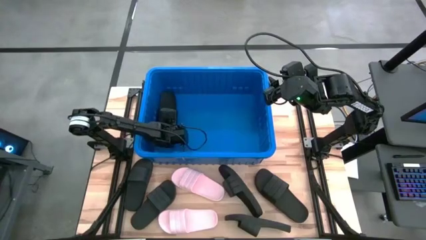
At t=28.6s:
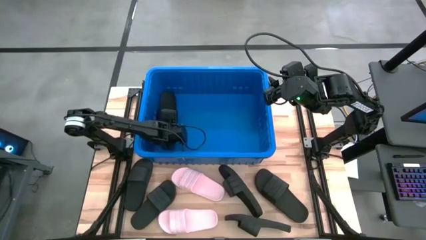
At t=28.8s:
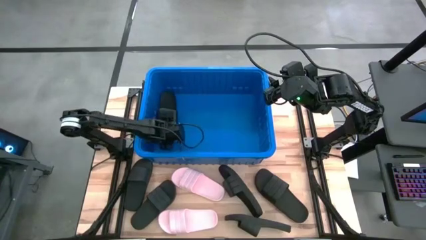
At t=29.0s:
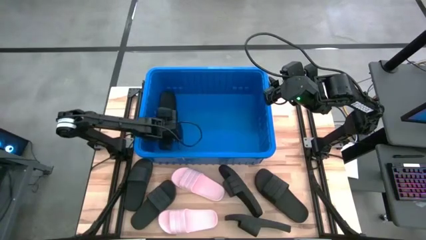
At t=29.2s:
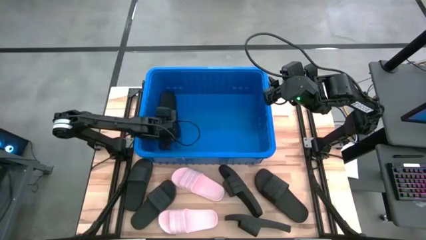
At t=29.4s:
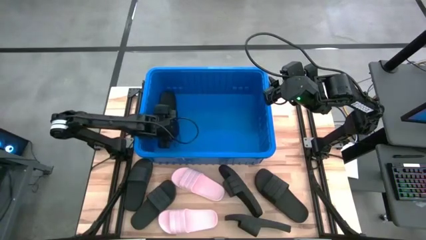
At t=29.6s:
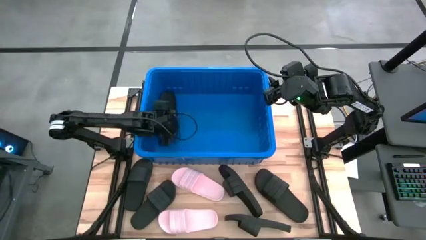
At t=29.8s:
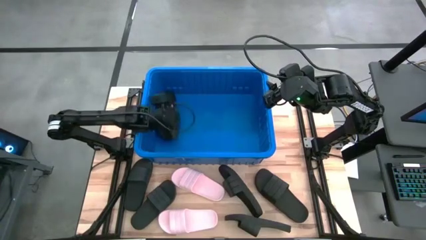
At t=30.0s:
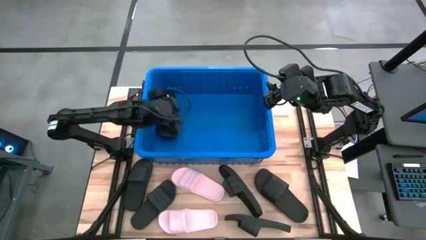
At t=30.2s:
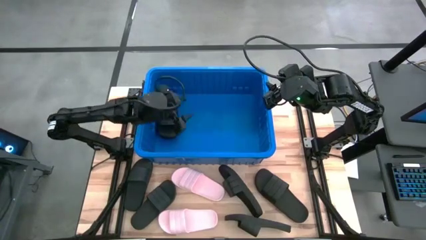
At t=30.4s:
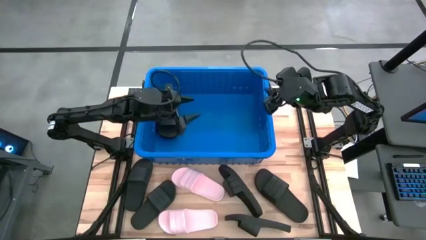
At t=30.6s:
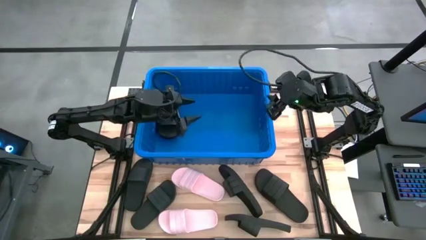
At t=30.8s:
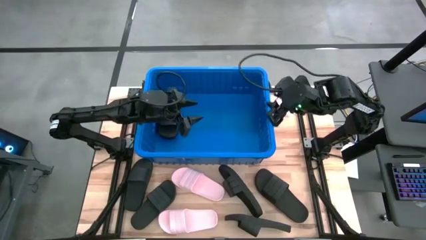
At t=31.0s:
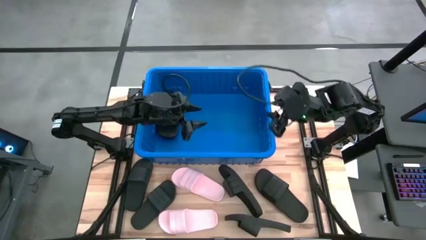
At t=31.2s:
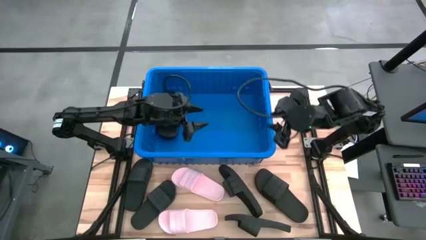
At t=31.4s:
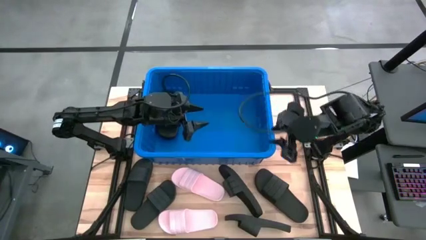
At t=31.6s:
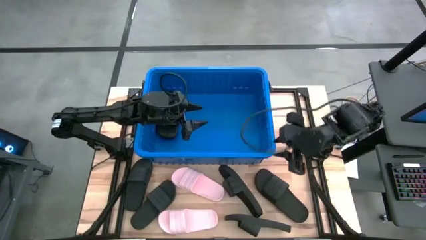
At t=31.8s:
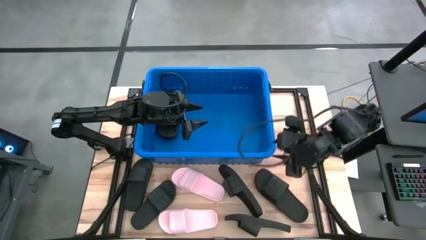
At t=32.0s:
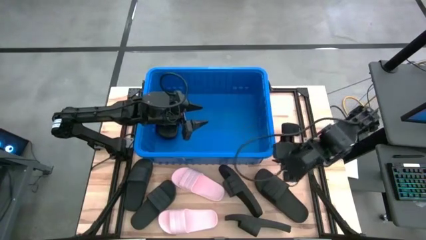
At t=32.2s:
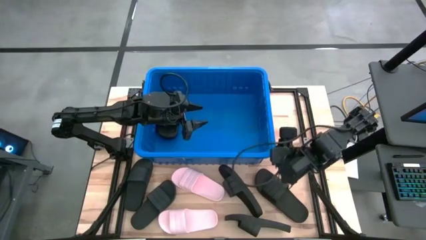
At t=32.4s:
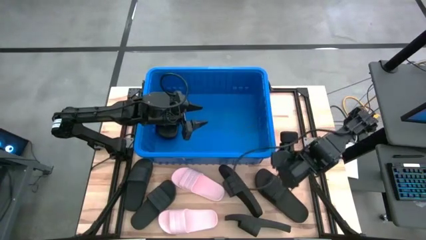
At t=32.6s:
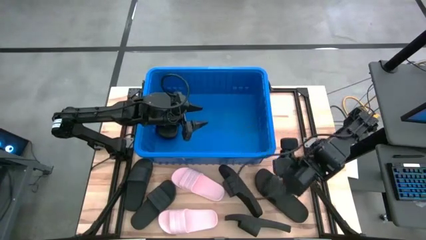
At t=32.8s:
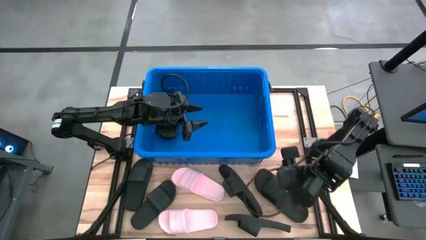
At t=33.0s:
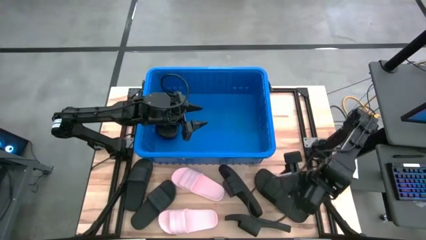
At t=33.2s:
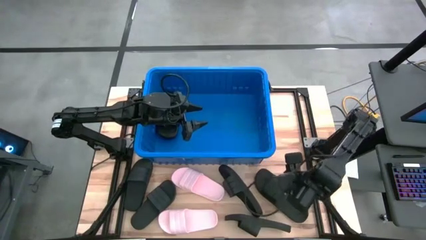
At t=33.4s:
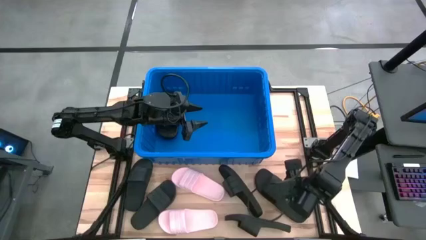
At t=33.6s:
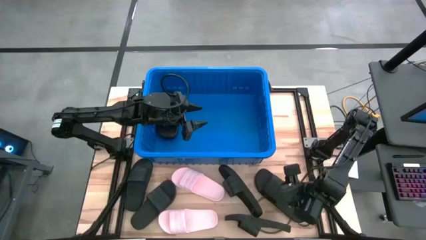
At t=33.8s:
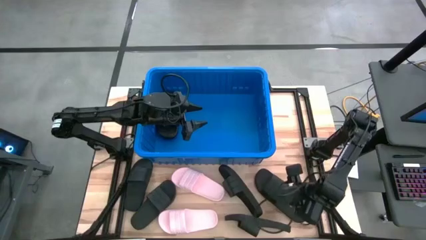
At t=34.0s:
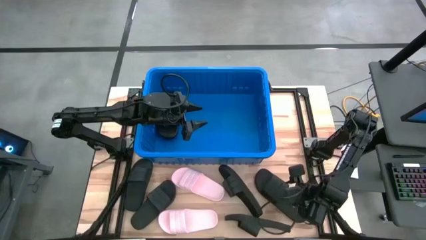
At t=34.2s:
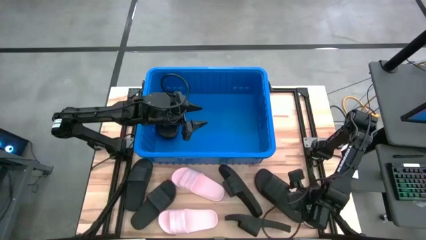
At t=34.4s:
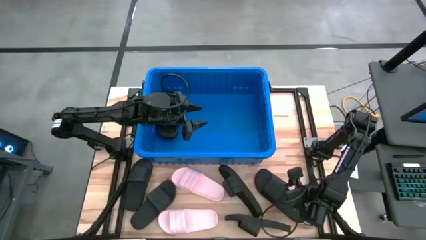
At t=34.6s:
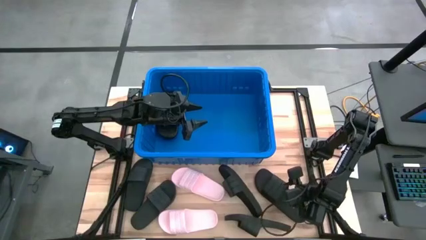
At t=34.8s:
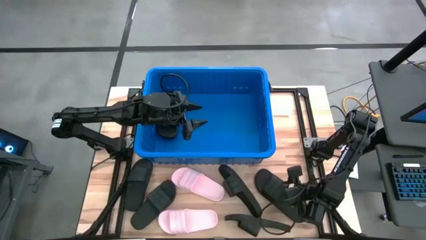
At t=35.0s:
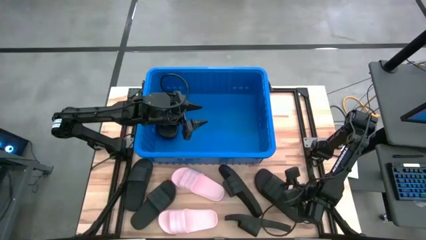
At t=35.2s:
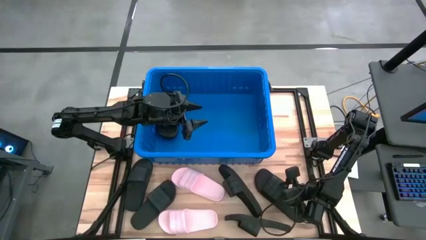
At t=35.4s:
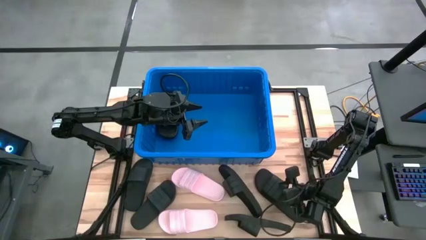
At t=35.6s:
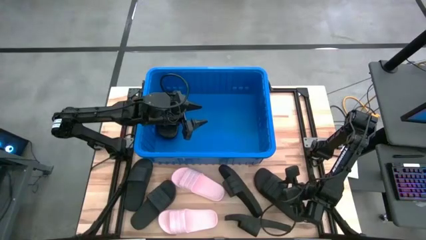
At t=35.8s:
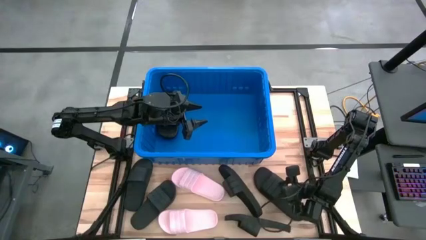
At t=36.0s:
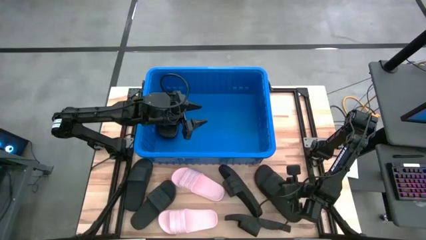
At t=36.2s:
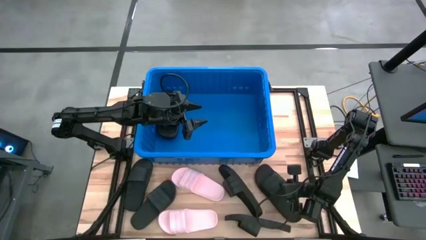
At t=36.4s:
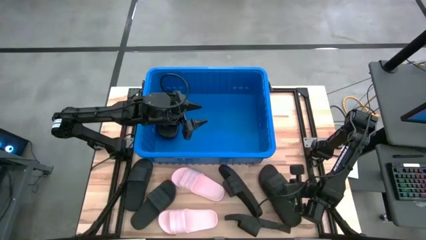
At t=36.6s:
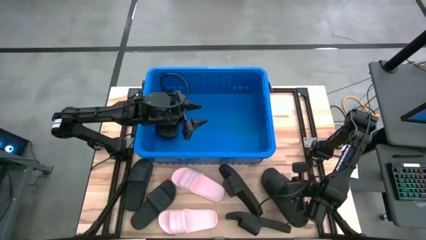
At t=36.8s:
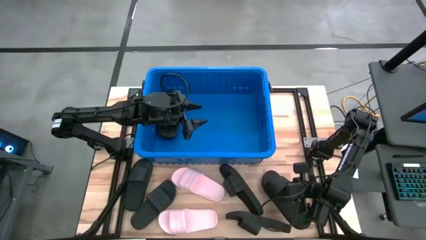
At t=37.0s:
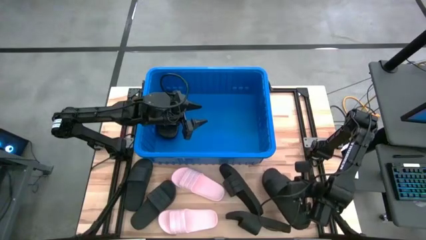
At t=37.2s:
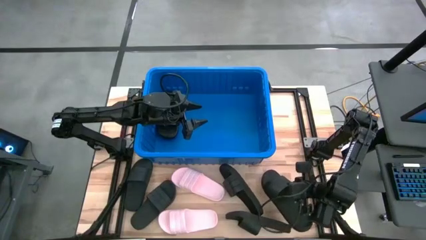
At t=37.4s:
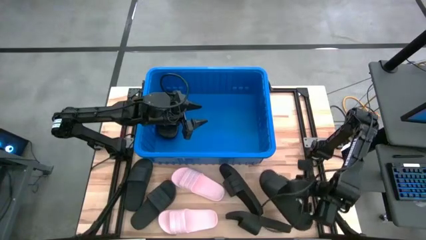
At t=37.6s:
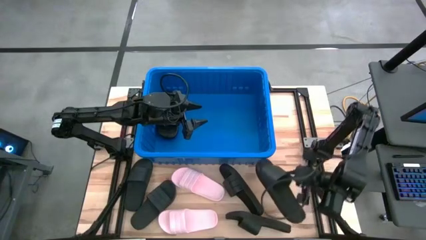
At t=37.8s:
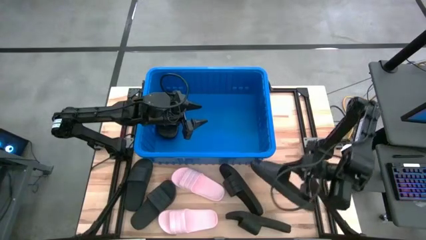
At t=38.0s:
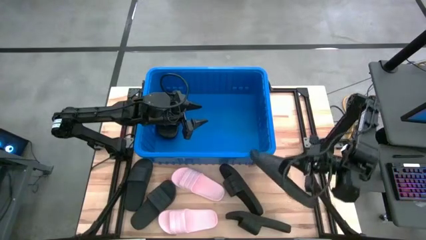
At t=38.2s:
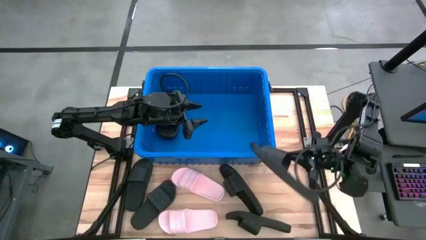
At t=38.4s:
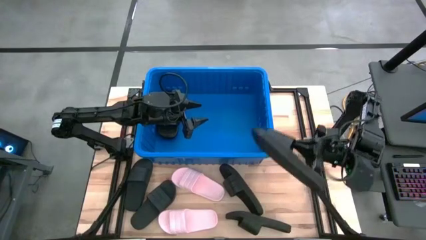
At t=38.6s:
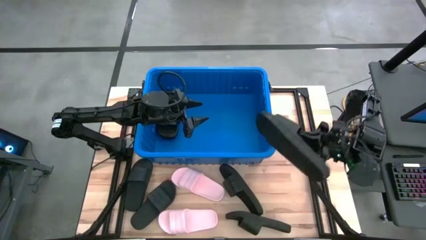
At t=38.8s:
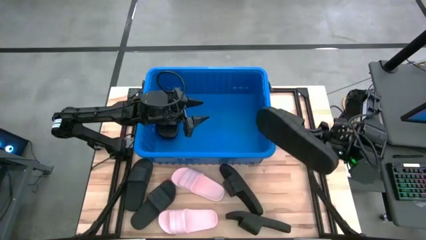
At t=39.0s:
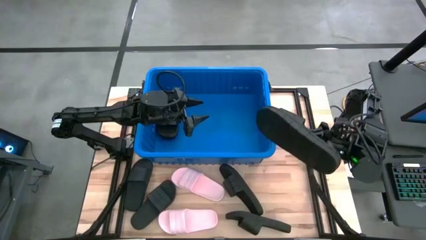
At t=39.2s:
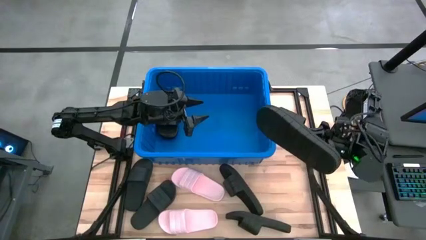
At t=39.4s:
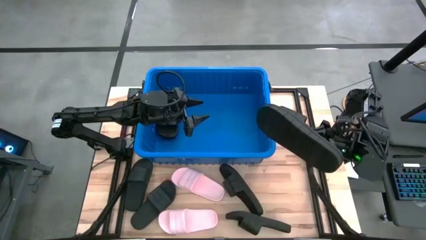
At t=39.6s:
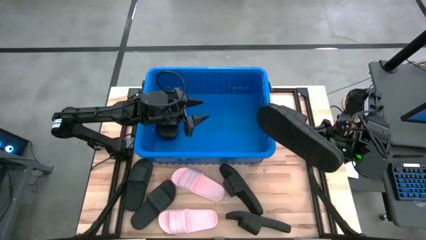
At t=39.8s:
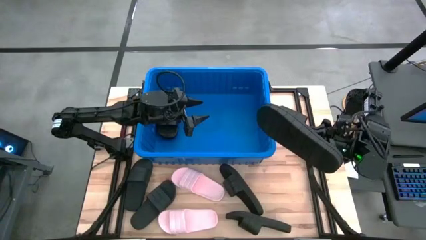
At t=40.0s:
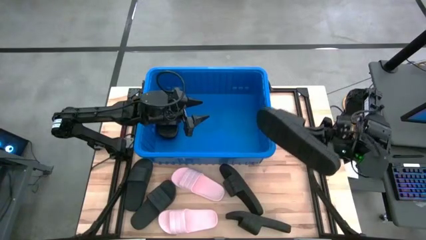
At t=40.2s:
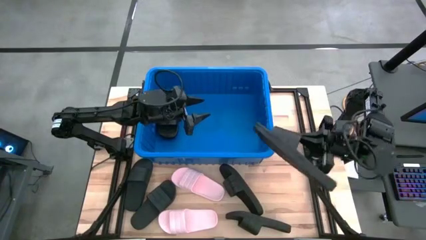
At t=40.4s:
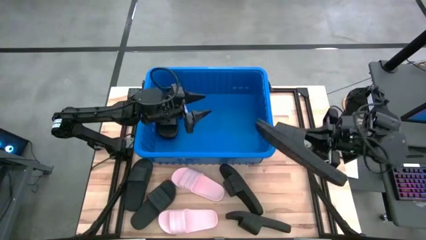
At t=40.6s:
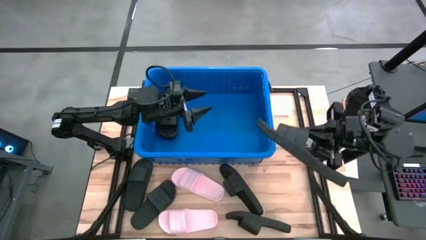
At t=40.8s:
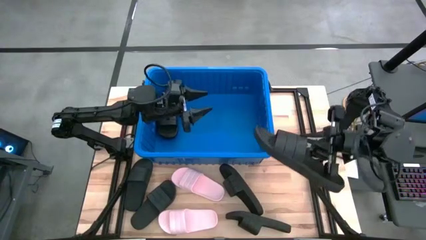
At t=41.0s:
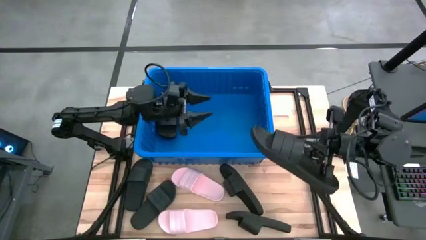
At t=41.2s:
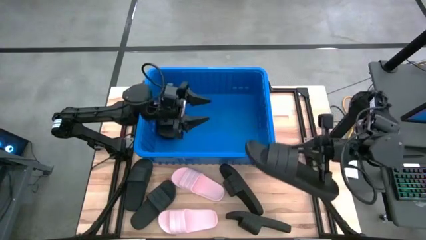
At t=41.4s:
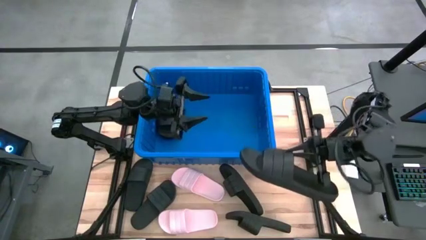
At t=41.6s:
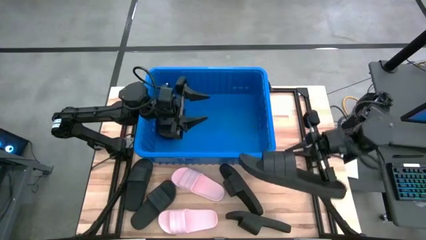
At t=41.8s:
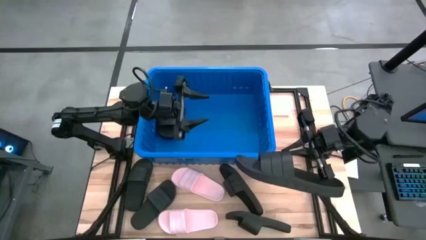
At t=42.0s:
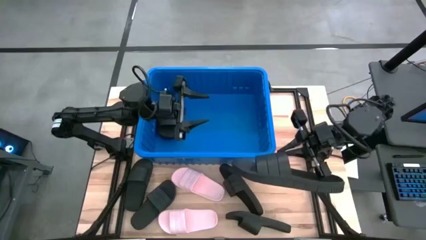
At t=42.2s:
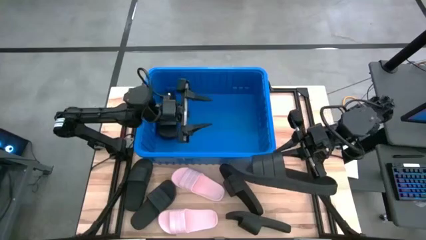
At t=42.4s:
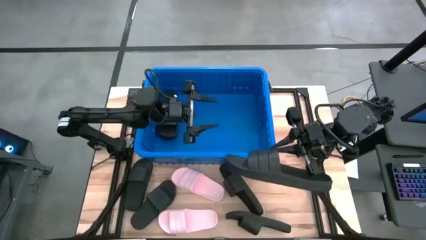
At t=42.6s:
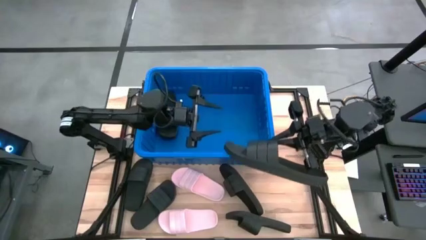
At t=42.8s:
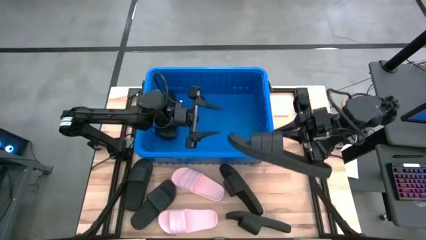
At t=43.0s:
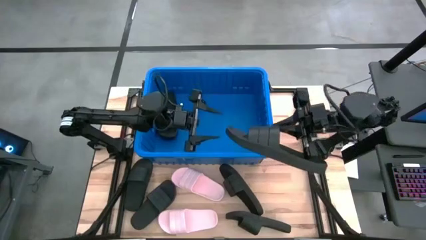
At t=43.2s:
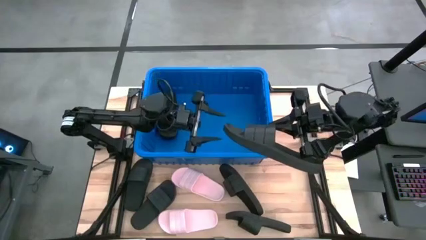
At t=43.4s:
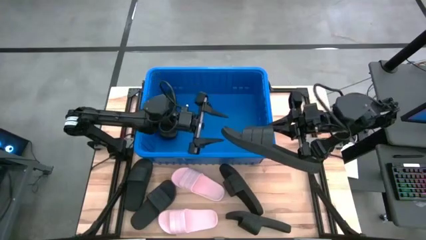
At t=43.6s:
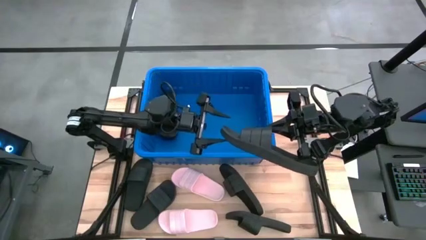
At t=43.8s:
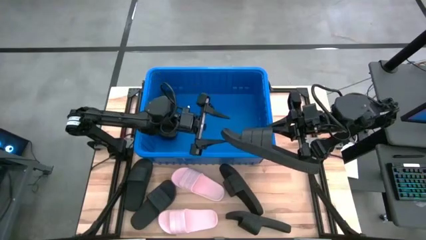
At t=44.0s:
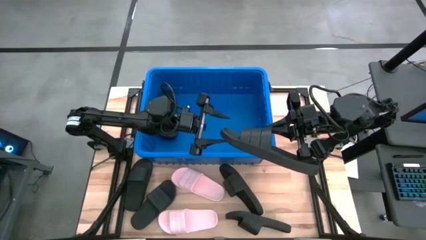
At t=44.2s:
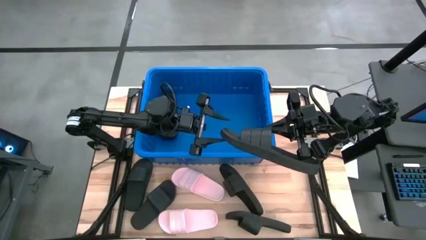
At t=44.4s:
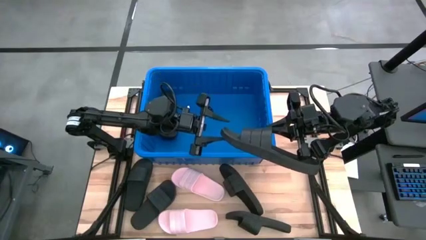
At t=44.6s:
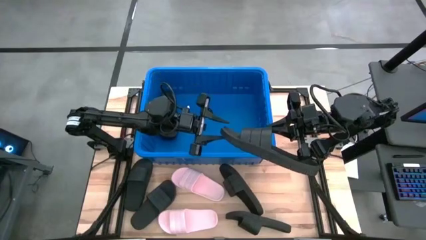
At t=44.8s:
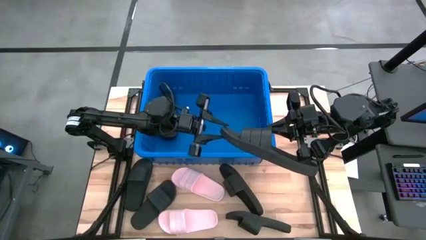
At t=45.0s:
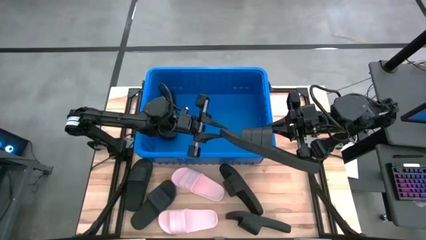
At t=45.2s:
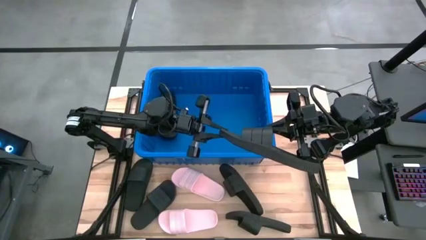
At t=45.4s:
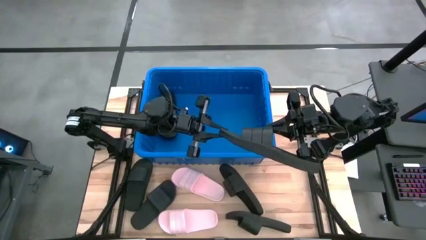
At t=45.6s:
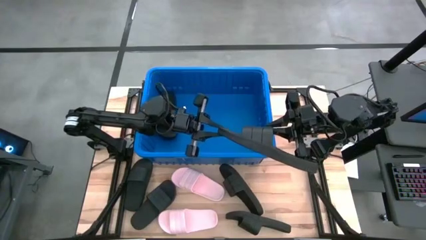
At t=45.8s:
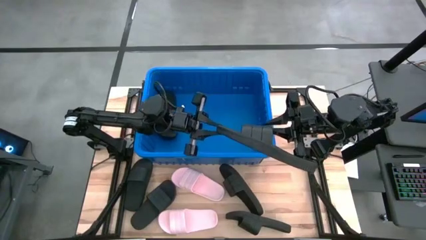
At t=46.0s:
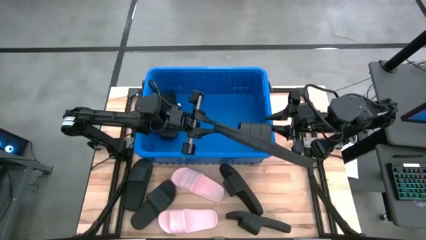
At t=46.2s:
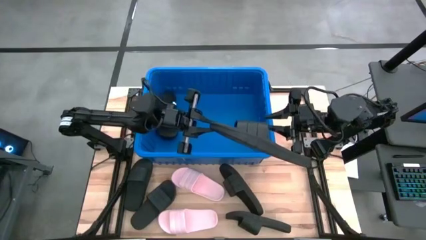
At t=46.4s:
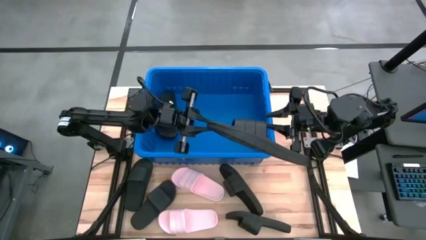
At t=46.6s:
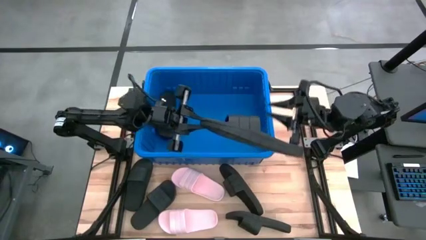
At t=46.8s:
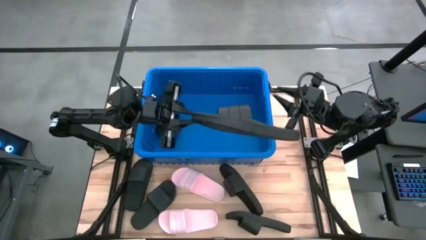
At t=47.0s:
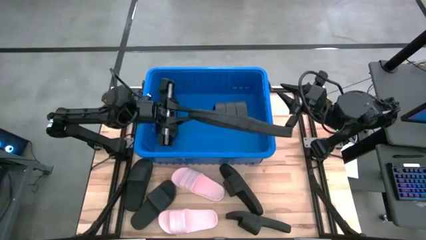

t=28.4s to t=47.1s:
Task: Pick and place slides into bin
Stack the black slide on top of the black slide into the blue container
